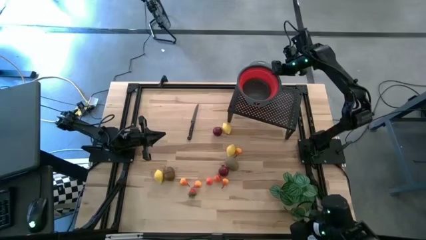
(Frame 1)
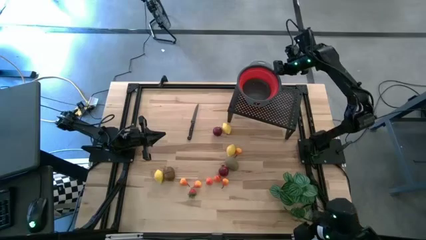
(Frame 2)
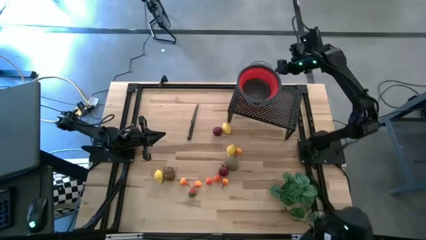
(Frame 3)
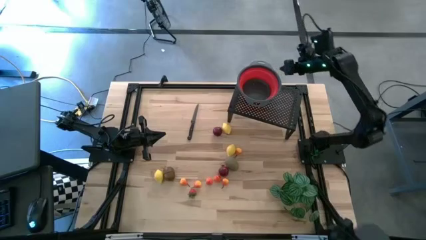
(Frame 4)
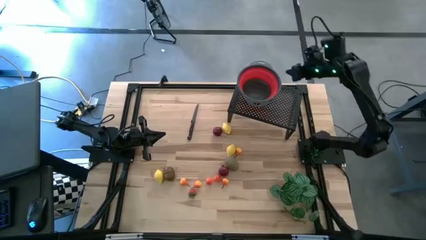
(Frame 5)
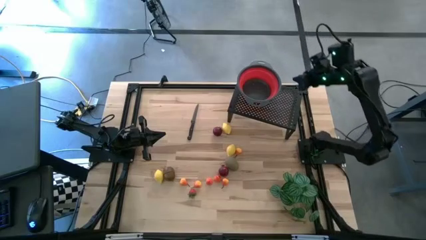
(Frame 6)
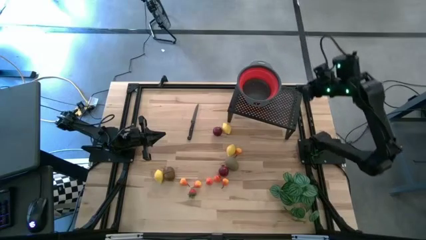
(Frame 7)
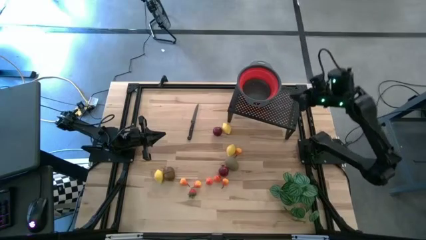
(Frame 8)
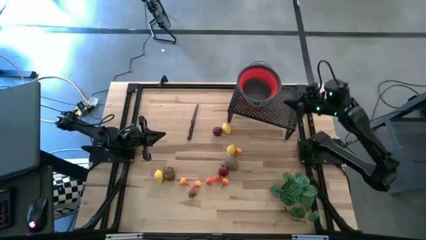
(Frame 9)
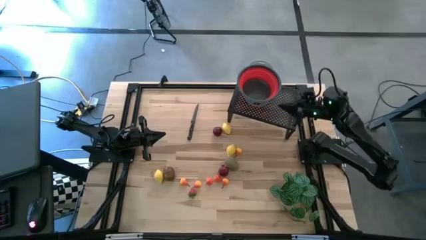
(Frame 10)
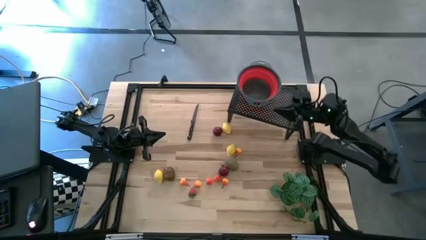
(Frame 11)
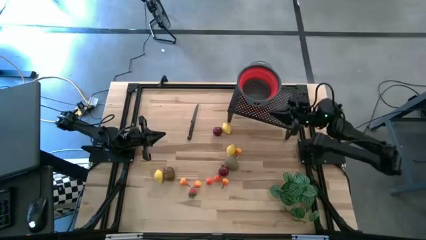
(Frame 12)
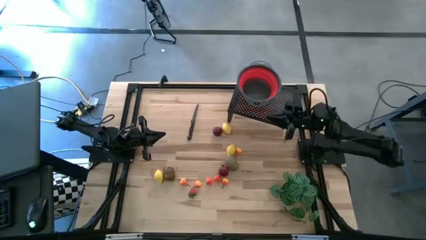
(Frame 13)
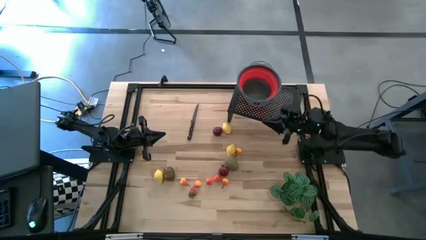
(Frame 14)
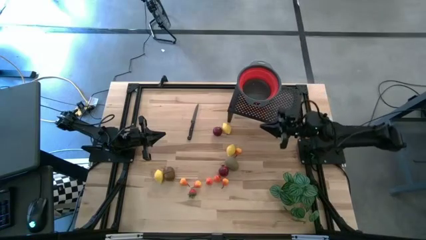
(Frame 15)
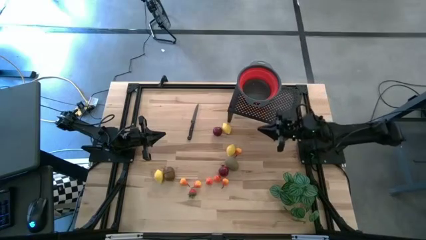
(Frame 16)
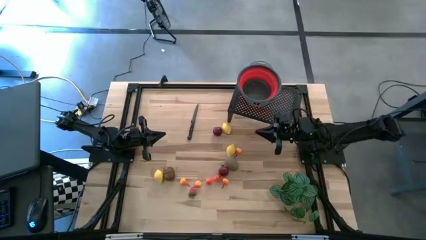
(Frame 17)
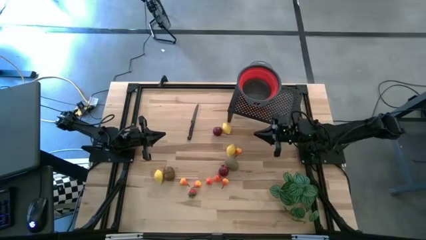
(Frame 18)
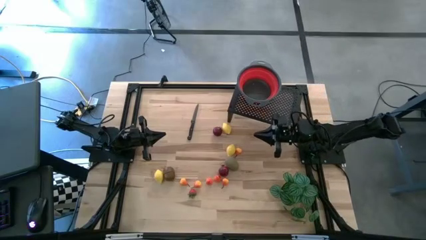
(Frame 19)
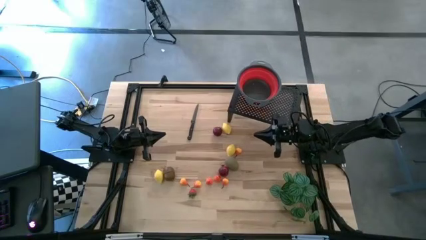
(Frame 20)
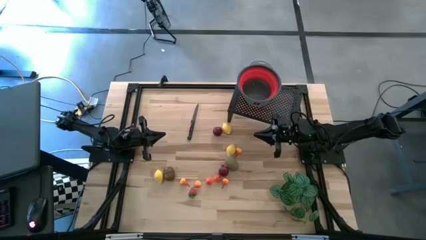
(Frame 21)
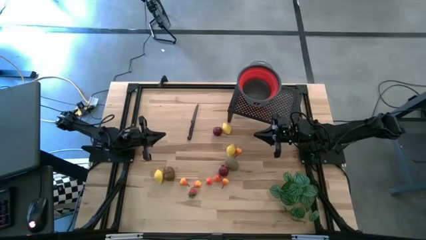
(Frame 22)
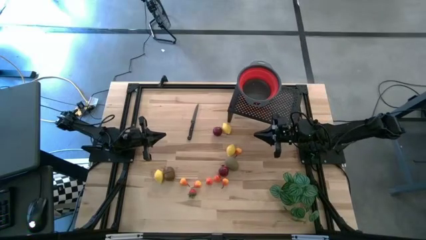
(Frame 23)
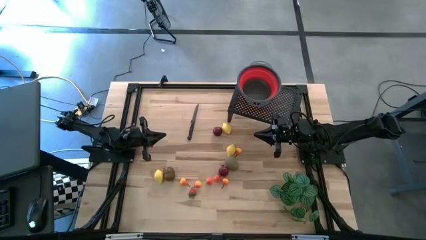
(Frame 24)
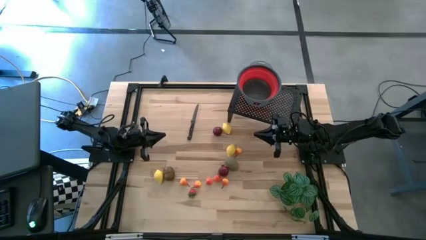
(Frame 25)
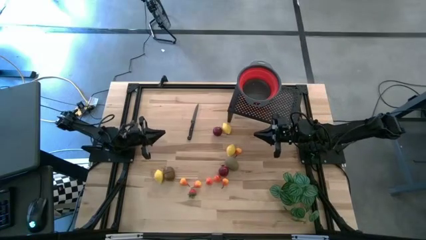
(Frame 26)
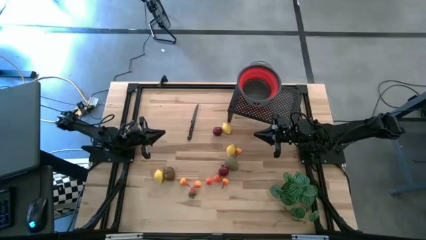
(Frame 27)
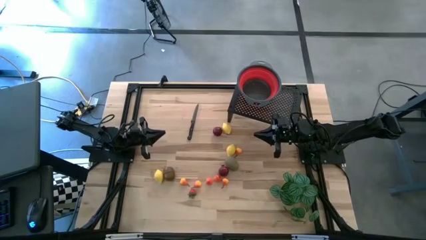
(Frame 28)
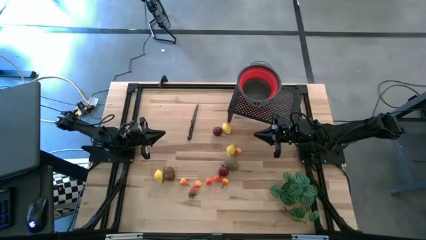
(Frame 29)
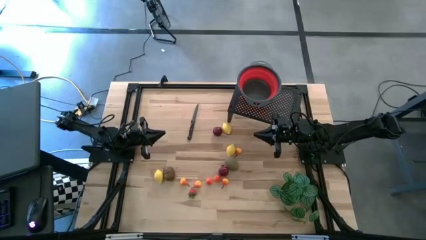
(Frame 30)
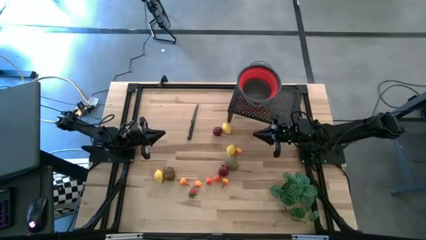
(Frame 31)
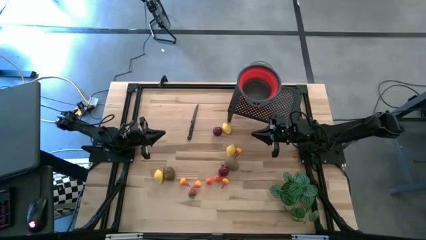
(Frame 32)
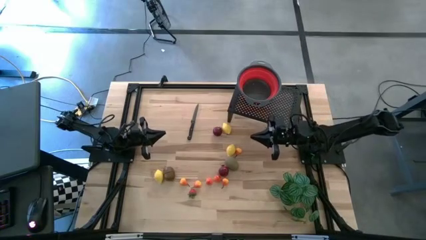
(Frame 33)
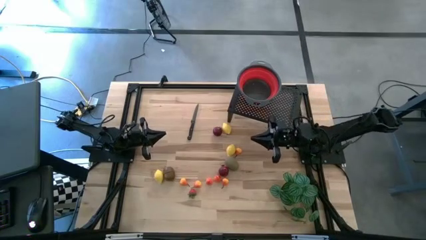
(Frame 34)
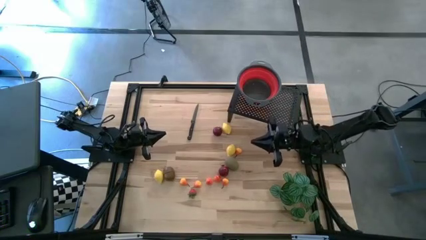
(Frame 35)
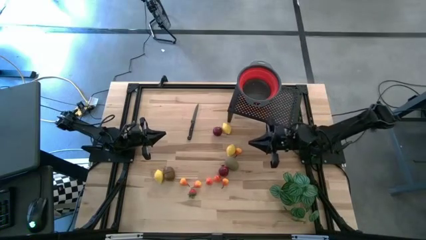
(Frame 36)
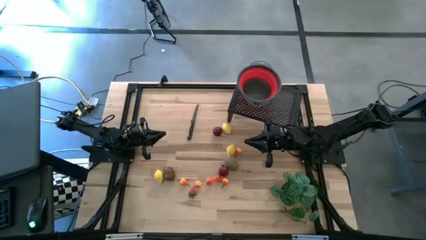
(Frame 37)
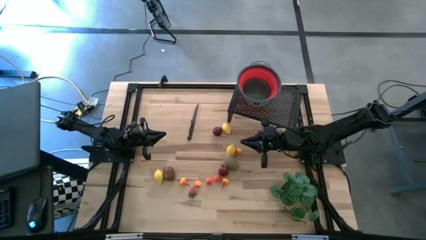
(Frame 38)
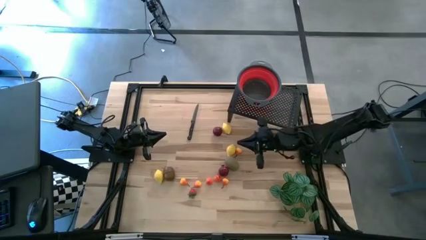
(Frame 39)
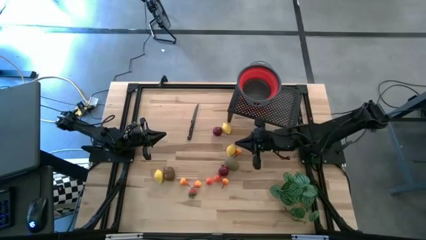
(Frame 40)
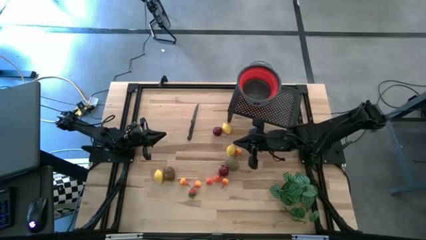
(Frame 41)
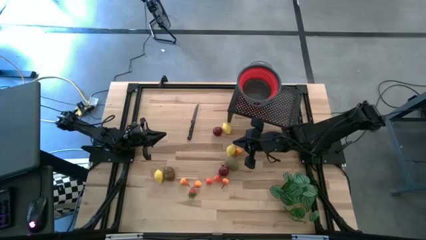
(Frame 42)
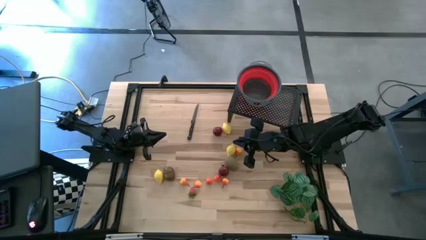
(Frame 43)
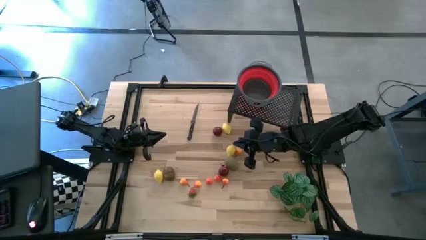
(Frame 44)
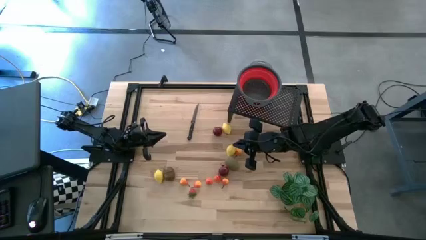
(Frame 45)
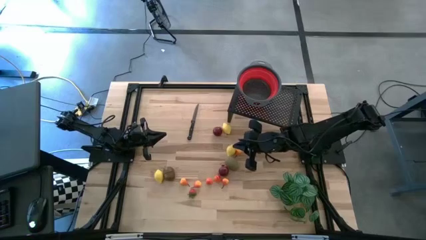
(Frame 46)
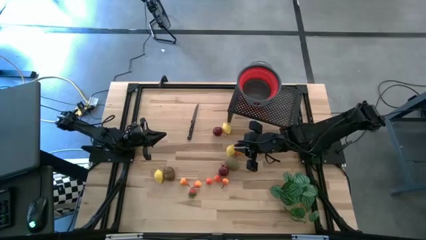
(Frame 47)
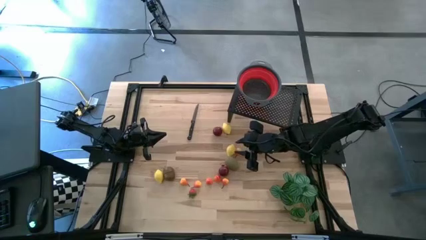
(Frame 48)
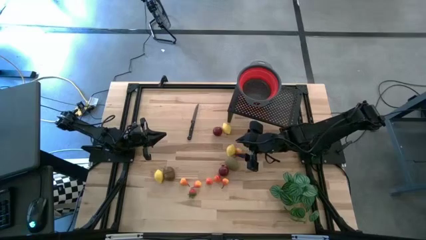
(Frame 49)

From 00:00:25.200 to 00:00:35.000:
Task: Pick & Place Fruit
Put the brown kiwi into the red strainer bowl on the shelf

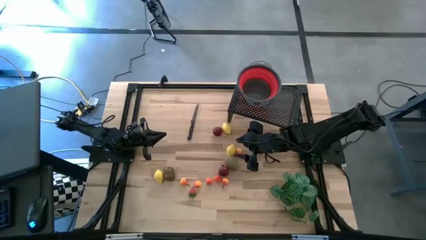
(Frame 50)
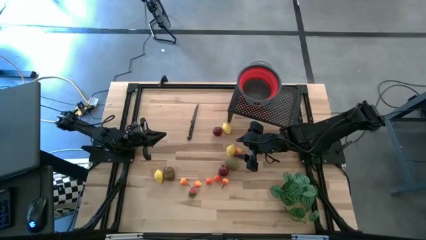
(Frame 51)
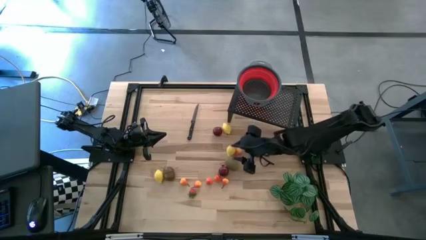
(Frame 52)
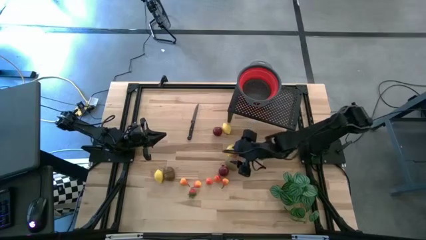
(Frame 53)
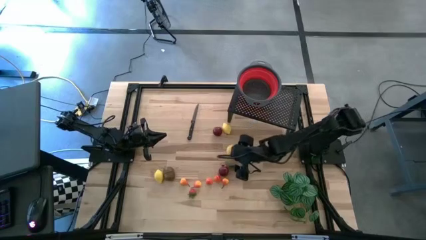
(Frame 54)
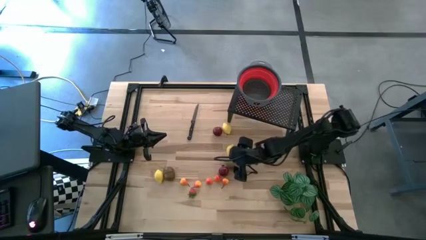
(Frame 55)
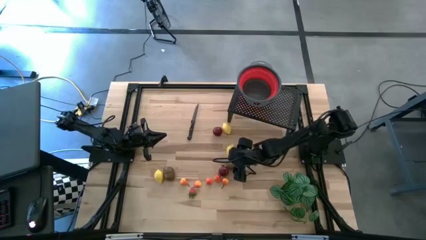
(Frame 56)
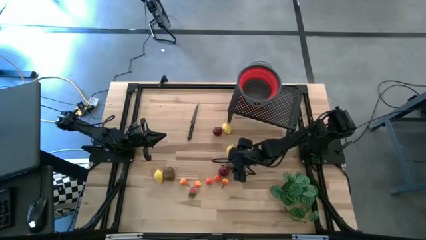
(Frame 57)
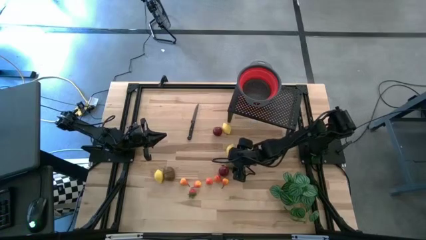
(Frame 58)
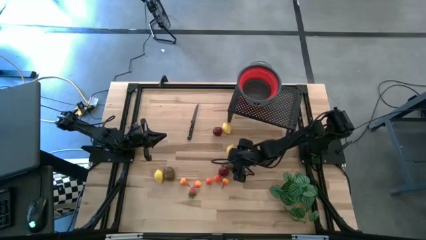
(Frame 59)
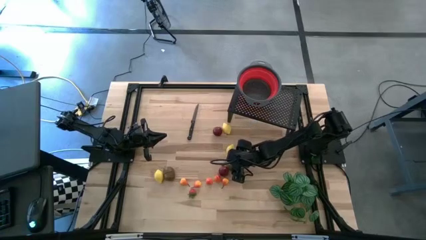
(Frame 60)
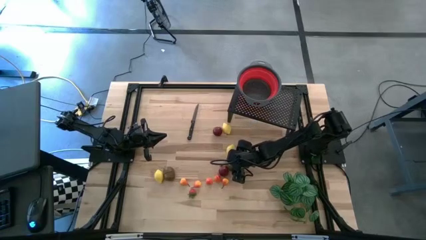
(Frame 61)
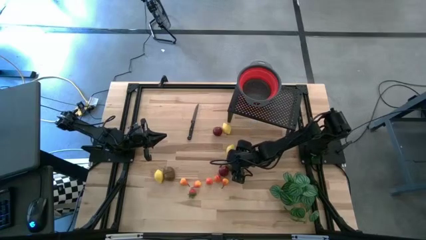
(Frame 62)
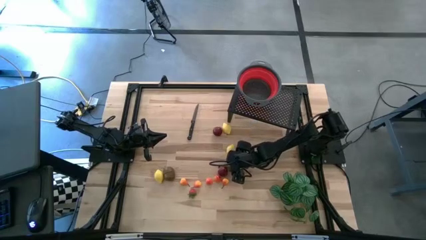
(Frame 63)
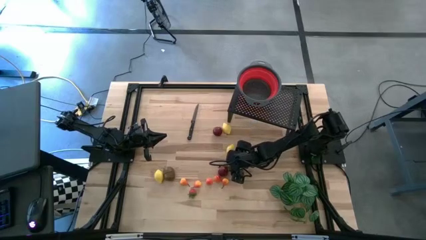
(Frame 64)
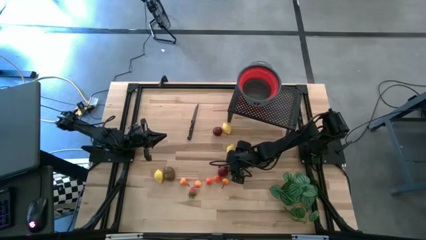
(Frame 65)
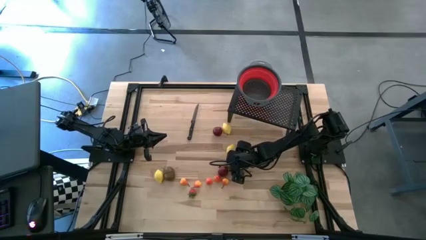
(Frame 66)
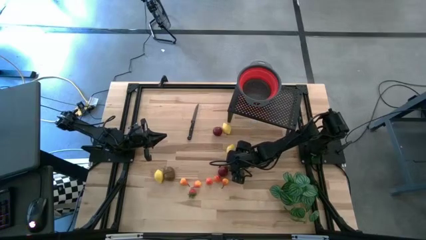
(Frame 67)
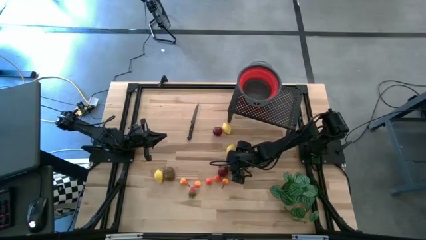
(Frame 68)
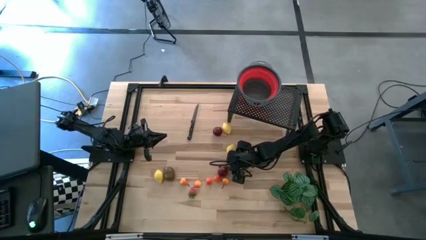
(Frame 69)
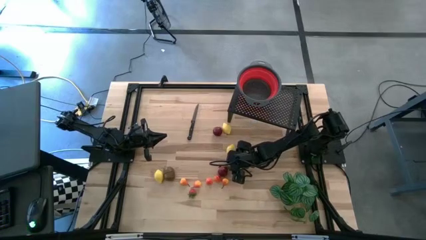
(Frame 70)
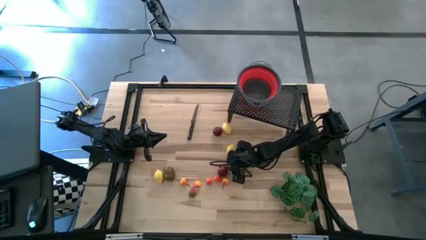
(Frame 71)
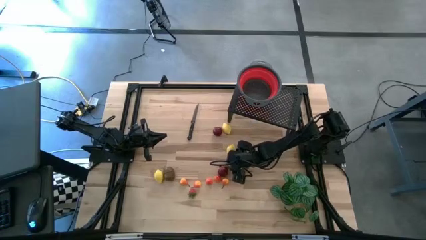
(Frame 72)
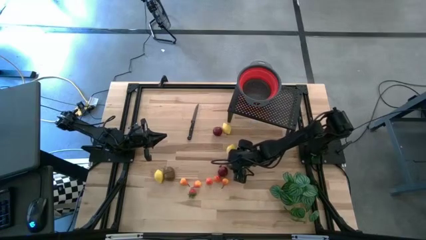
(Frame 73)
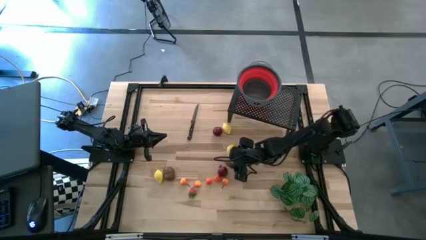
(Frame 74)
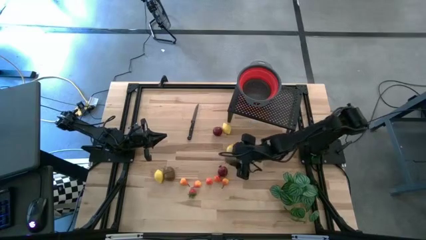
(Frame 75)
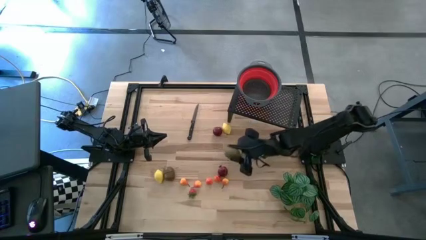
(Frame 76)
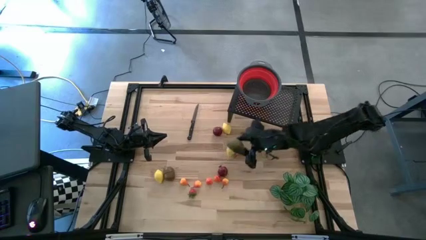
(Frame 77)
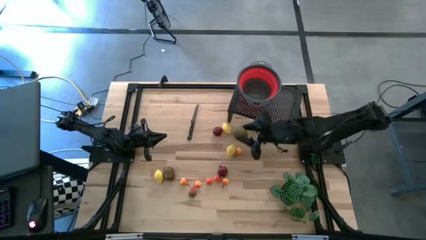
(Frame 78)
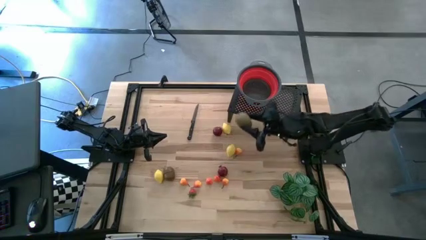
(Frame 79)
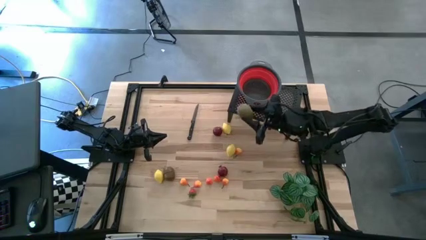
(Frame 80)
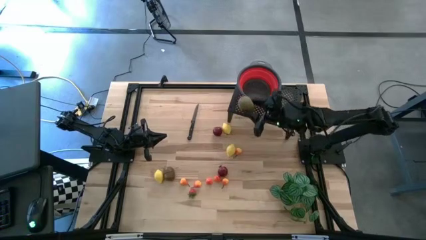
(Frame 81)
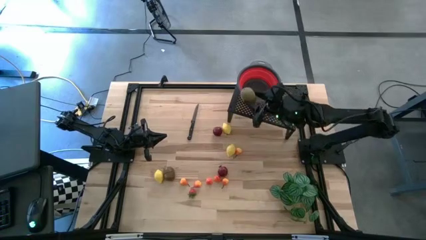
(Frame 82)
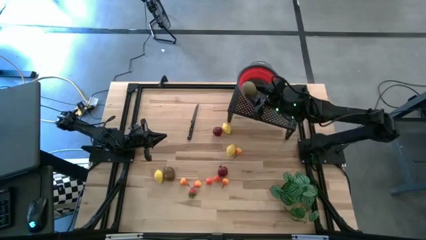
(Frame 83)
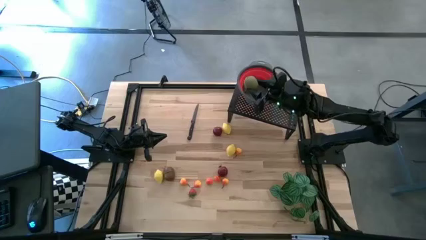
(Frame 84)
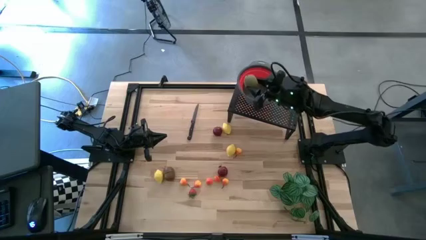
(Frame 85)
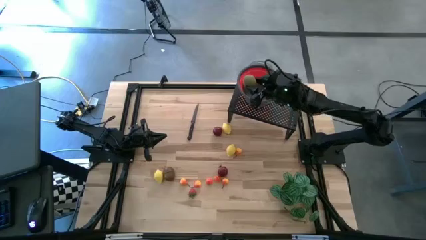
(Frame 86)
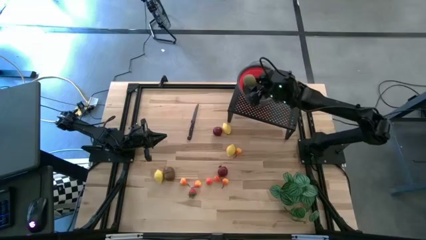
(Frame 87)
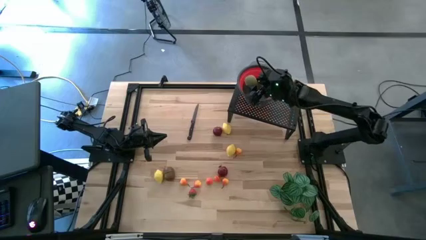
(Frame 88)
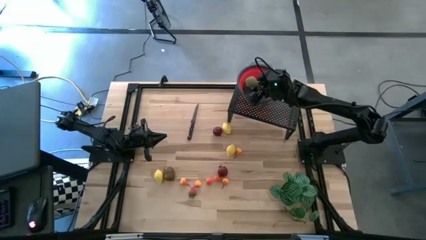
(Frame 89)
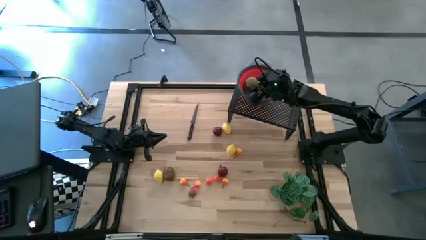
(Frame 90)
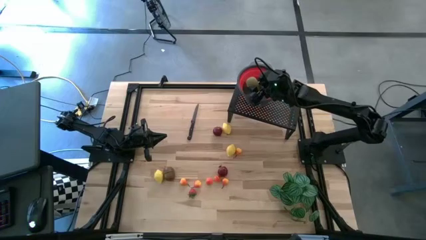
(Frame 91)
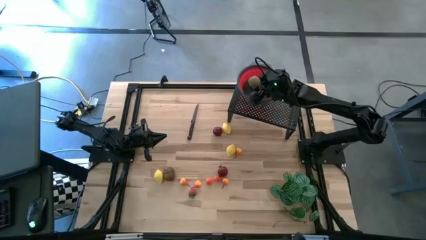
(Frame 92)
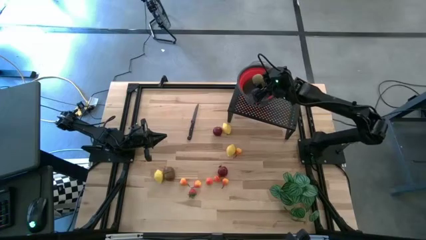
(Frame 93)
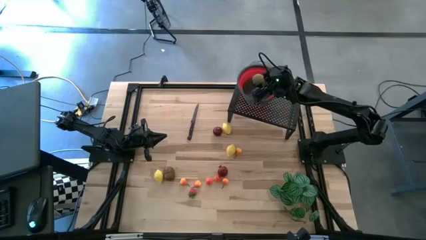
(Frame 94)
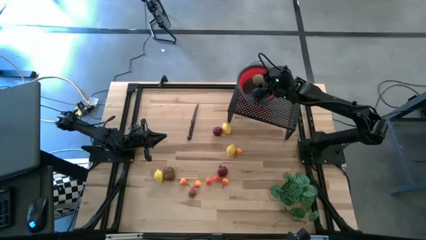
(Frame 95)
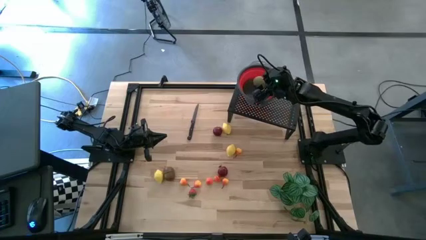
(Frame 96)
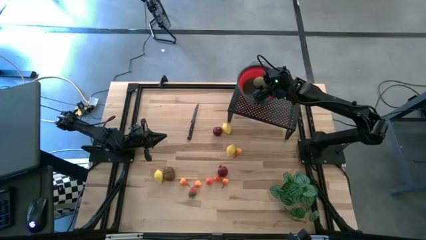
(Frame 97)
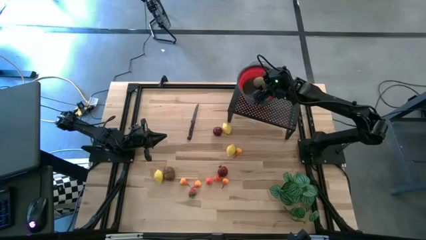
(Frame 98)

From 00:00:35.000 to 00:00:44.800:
Put the brown kiwi into the red strainer bowl on the shelf
